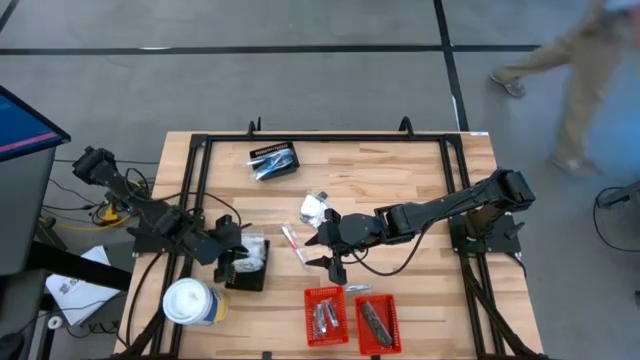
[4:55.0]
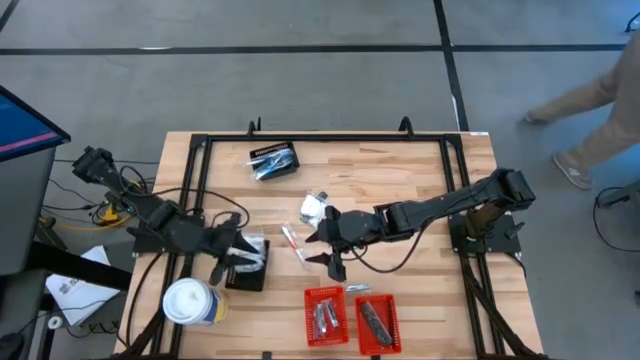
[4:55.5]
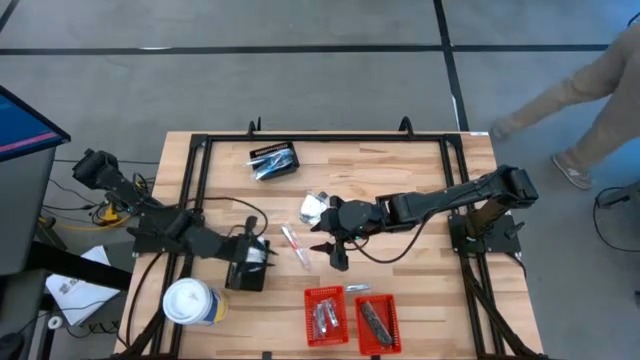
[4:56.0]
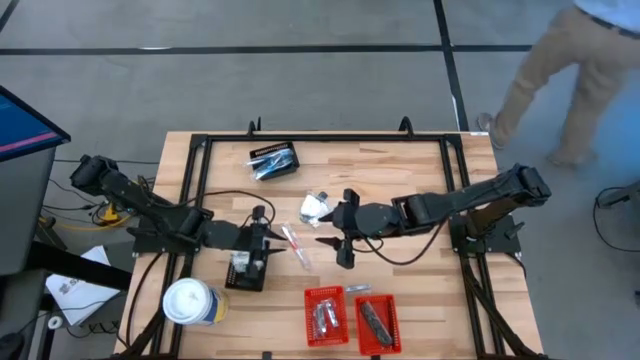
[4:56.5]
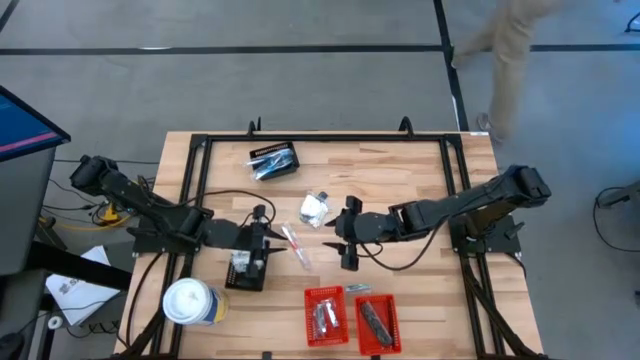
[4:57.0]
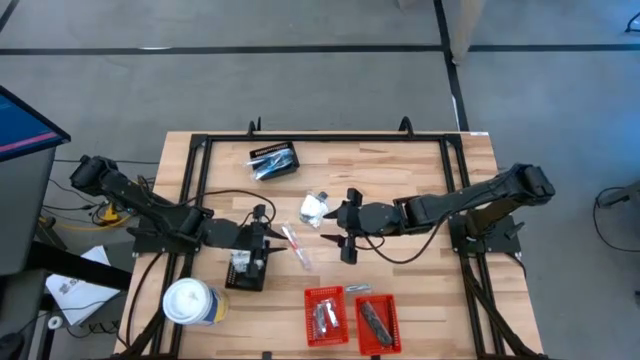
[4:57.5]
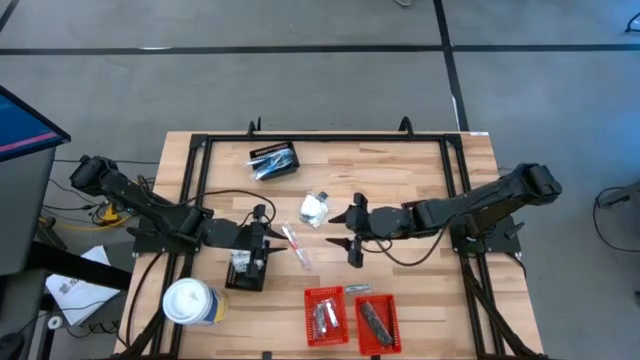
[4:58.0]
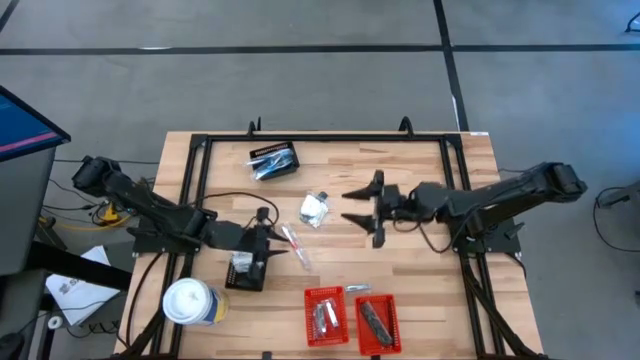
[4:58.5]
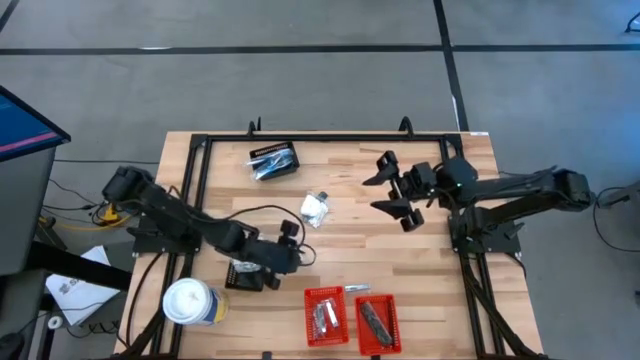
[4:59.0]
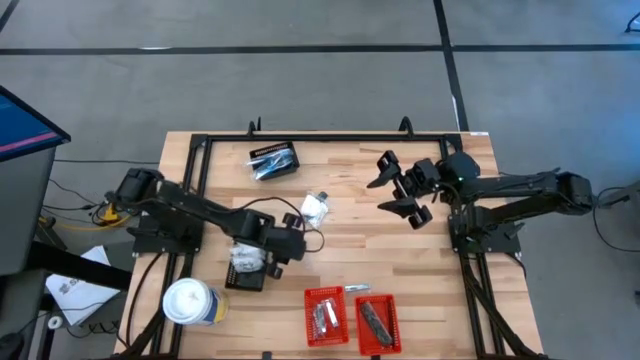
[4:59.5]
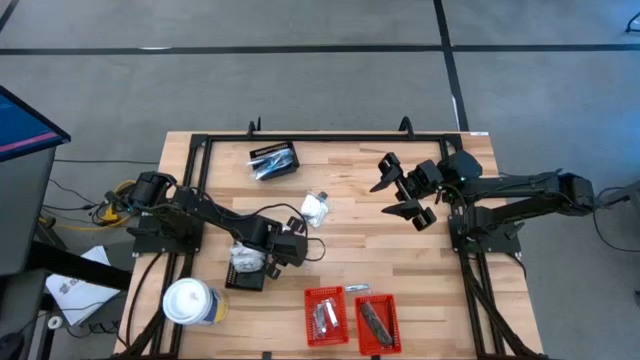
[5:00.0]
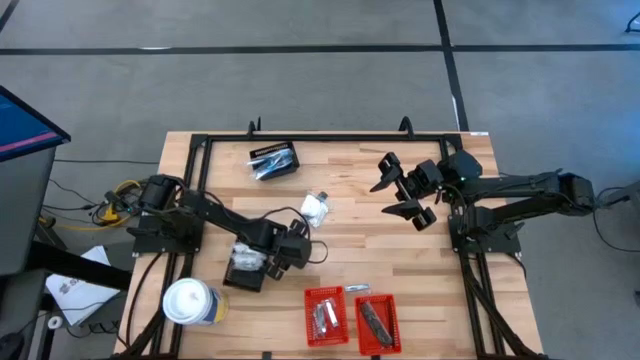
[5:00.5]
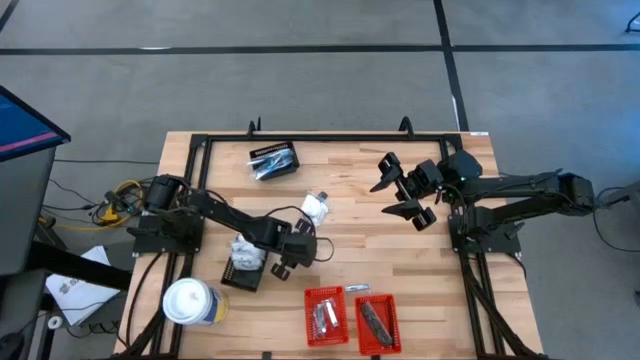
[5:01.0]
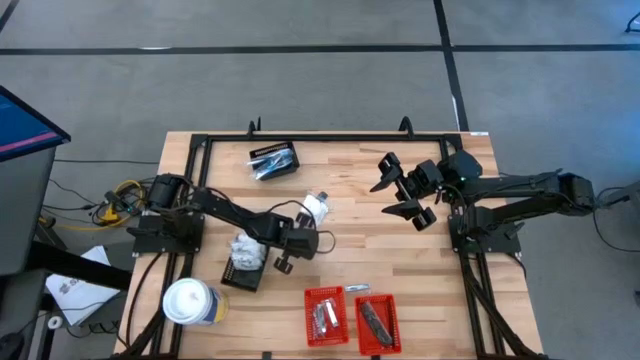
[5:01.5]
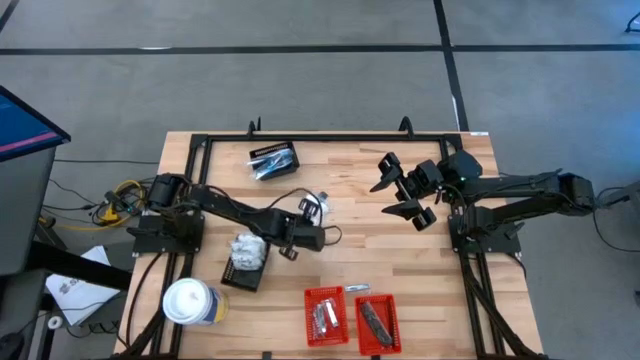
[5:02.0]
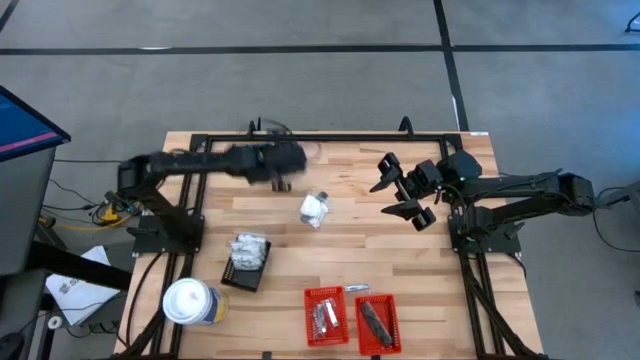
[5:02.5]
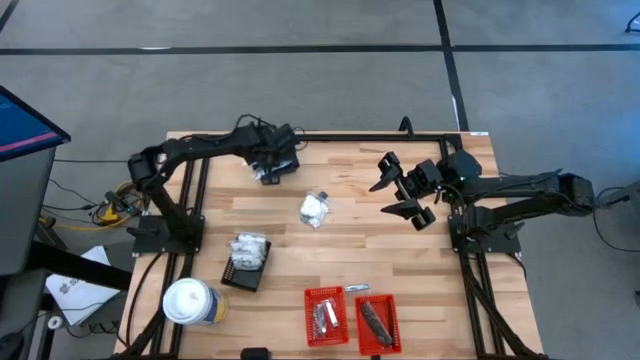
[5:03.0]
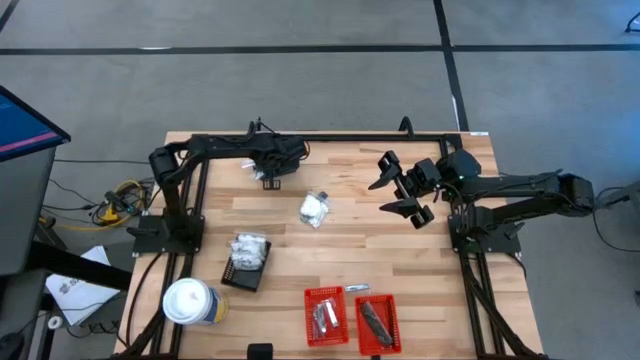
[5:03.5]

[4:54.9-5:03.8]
Task: Pick & Place Travel size toiletries
Put the red toothbrush into the top black bin

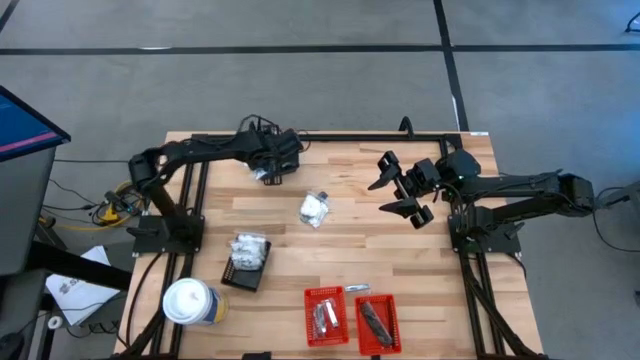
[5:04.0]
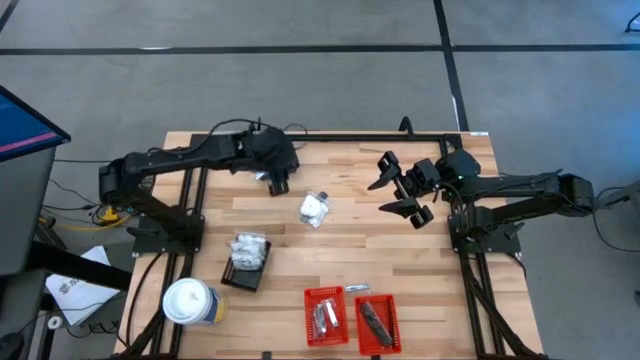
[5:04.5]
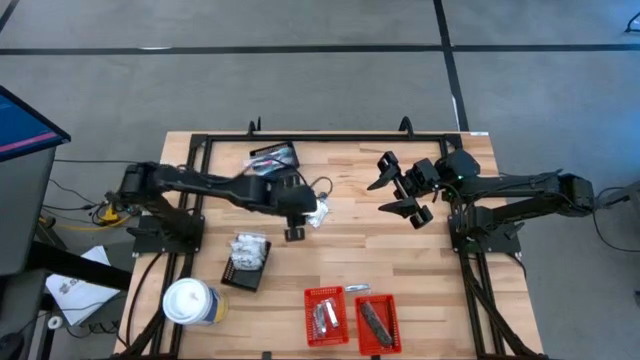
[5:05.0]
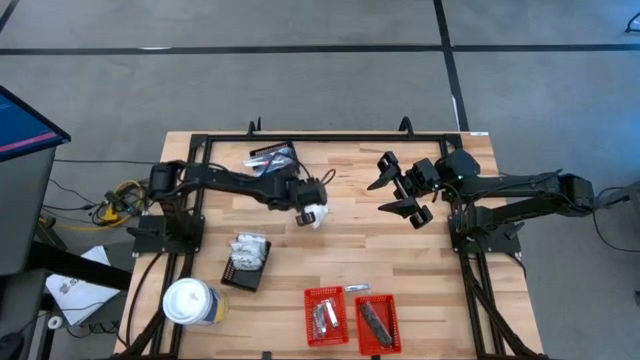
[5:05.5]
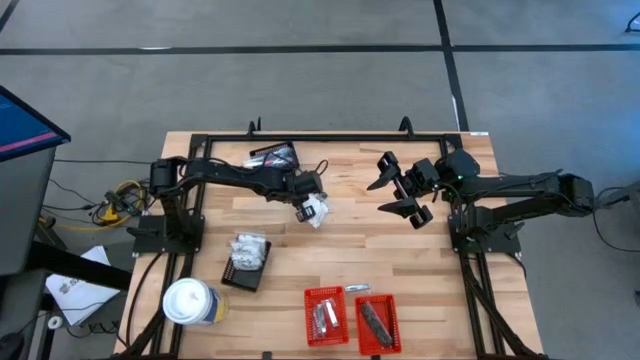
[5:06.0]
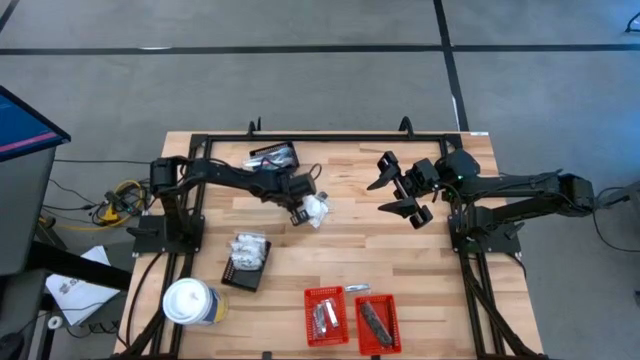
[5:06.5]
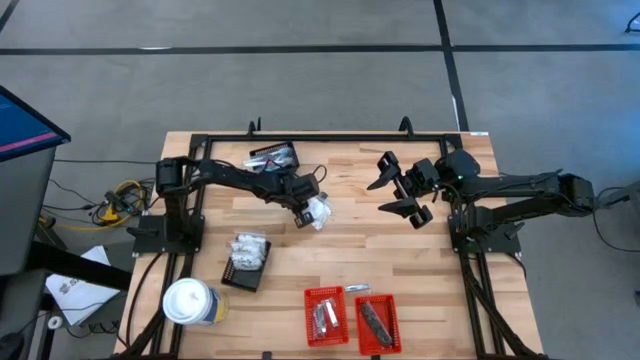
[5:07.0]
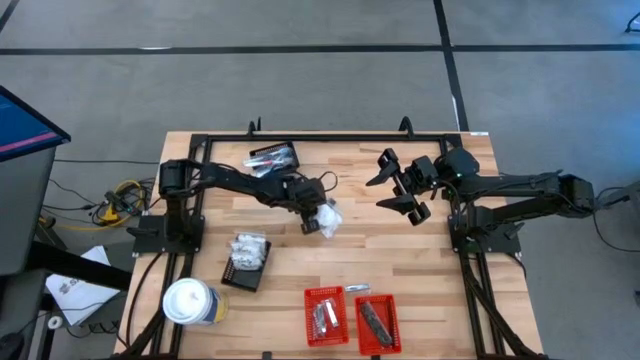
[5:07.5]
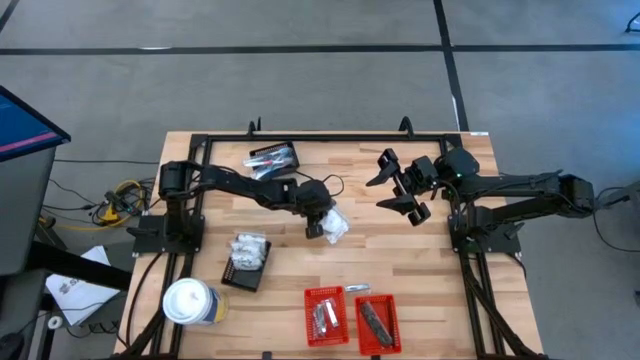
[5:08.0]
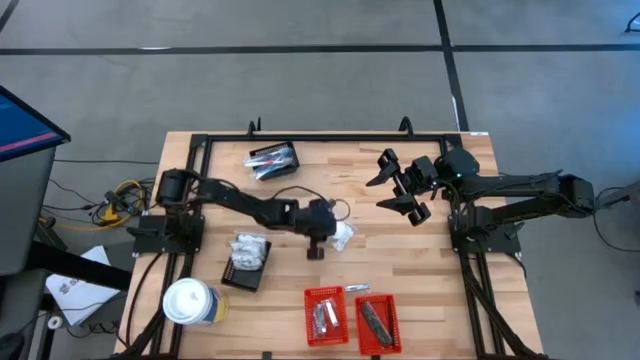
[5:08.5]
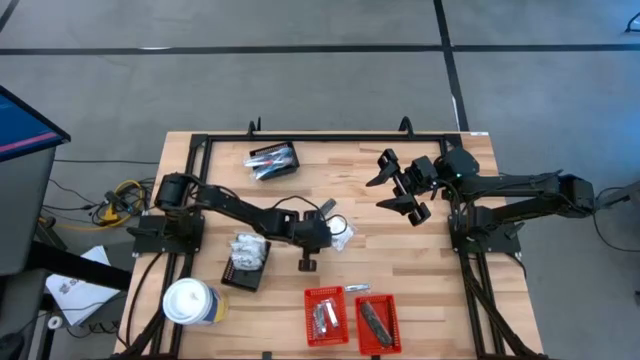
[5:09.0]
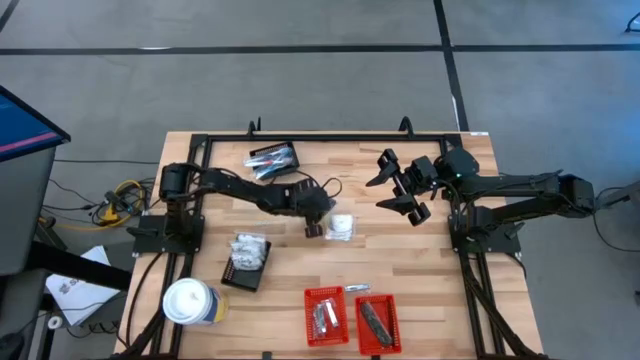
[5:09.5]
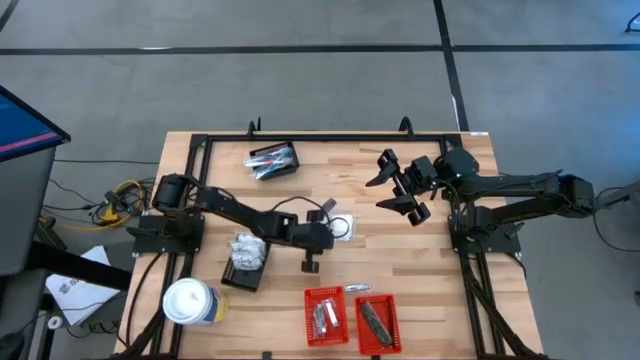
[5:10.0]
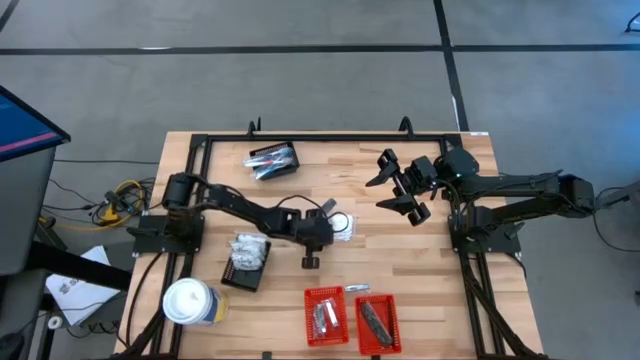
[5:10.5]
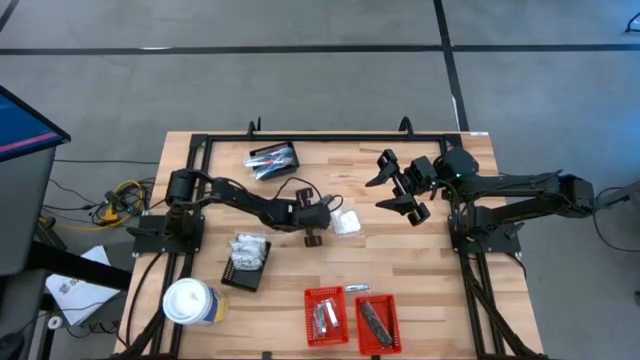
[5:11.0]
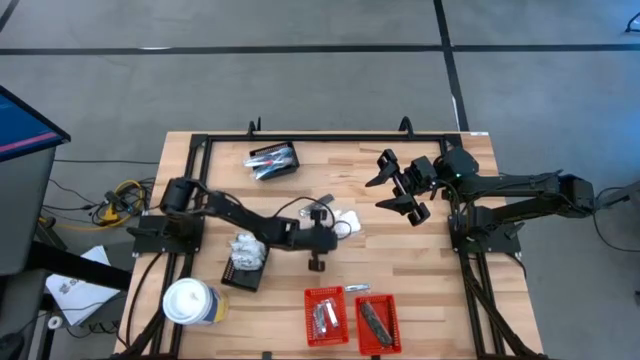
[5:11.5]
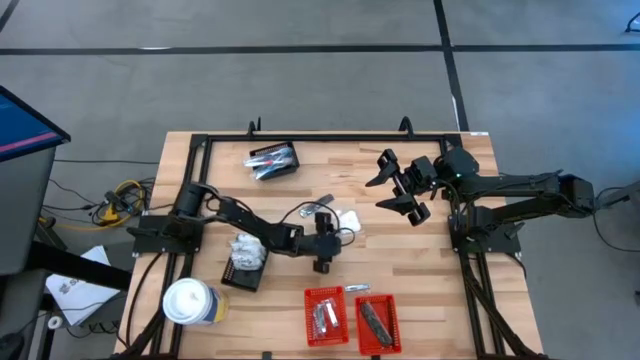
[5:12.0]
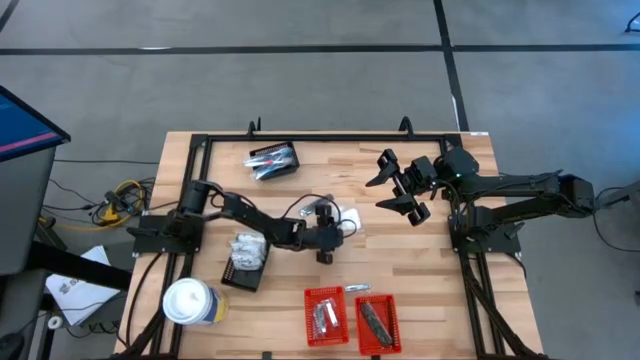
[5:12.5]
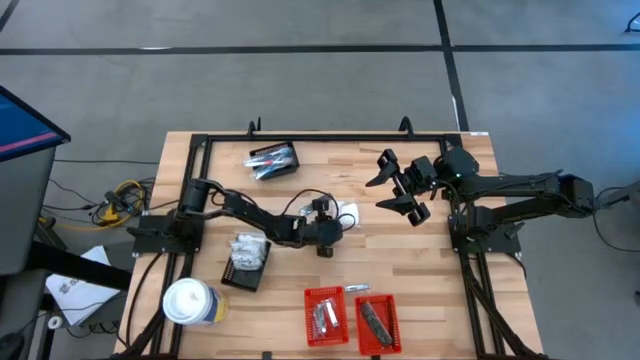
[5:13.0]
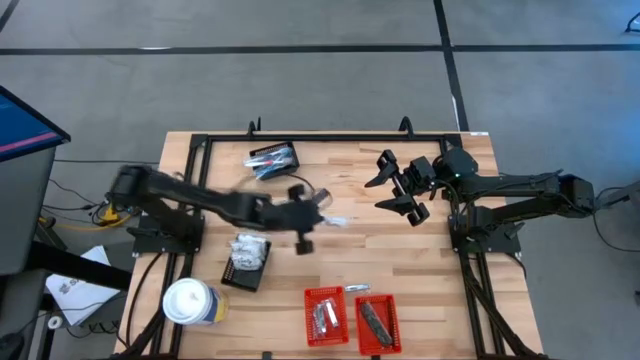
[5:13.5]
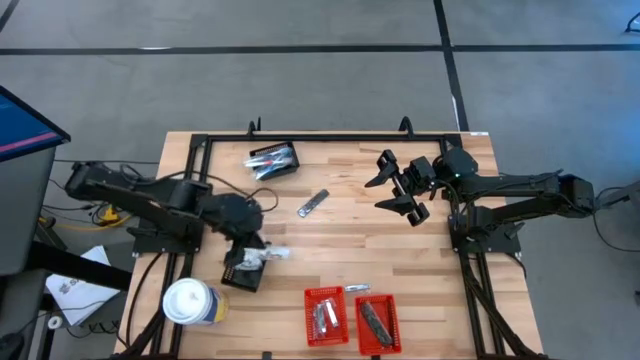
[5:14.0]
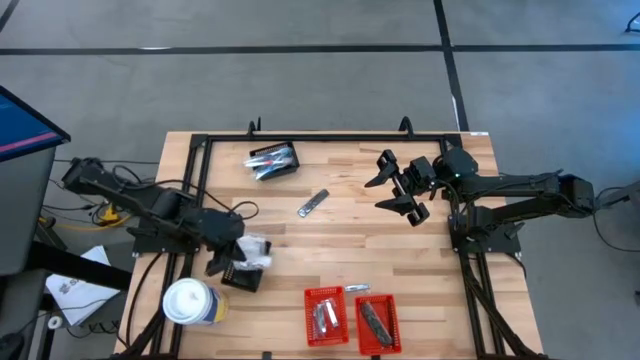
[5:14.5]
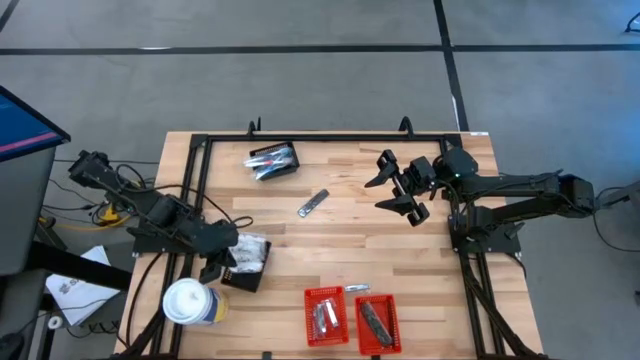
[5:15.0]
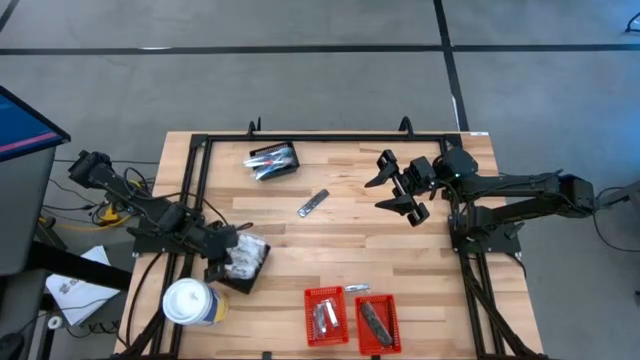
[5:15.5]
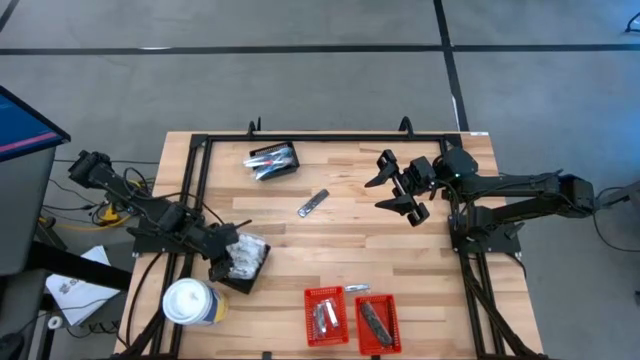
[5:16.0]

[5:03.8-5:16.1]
Put the cotton pack into the bottom black bin
